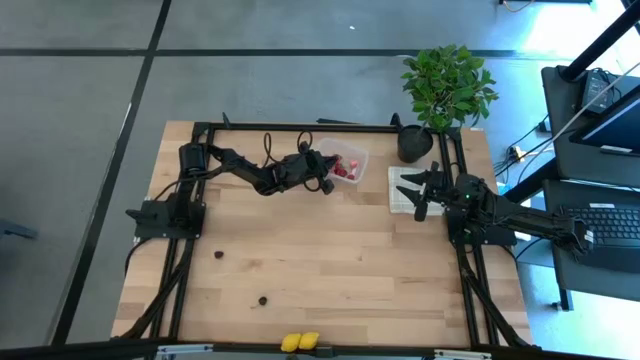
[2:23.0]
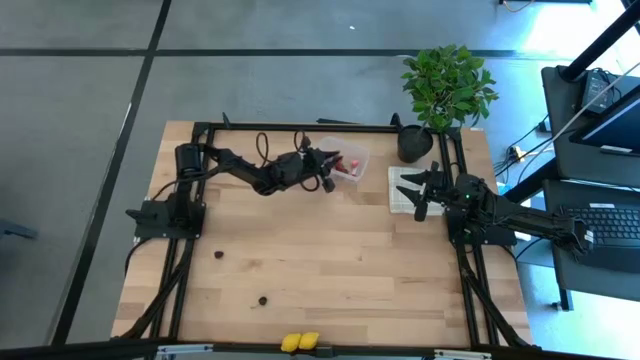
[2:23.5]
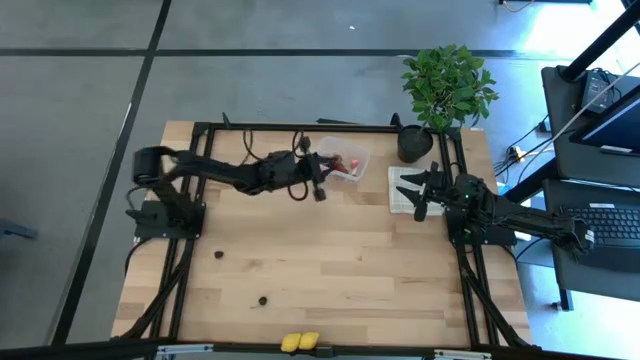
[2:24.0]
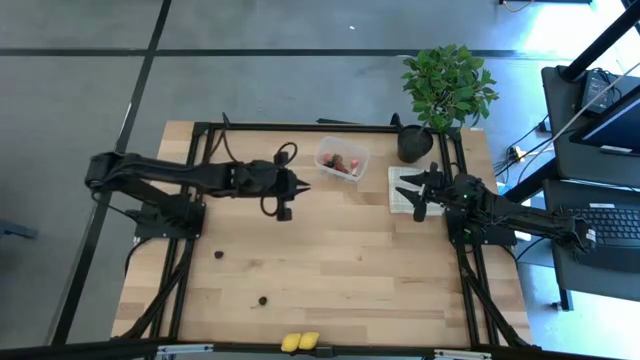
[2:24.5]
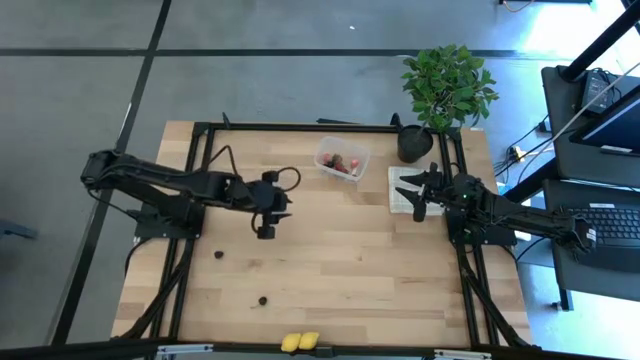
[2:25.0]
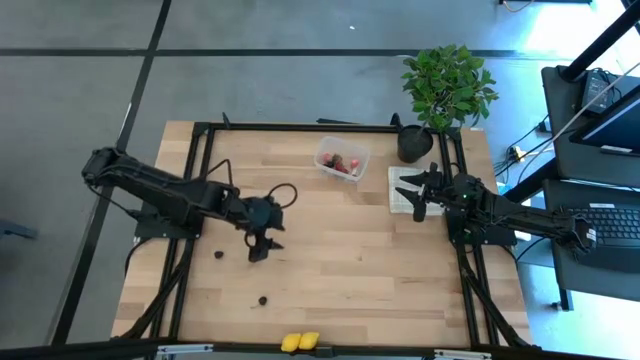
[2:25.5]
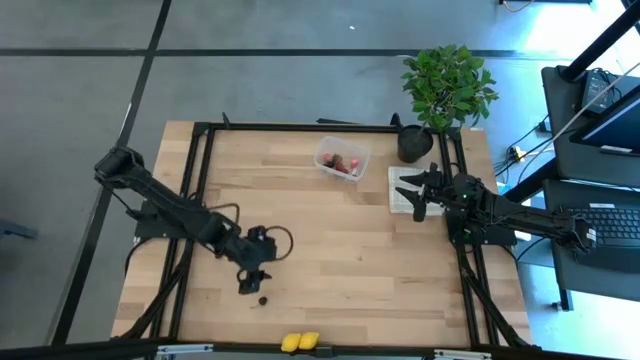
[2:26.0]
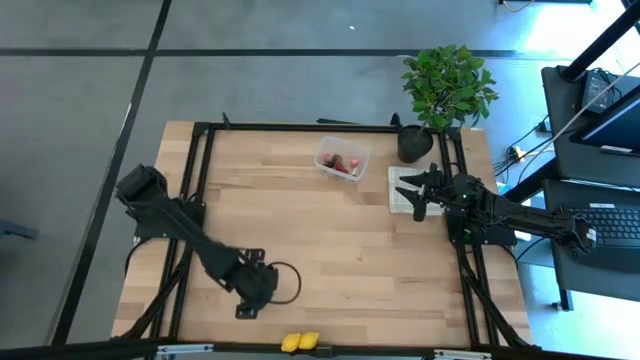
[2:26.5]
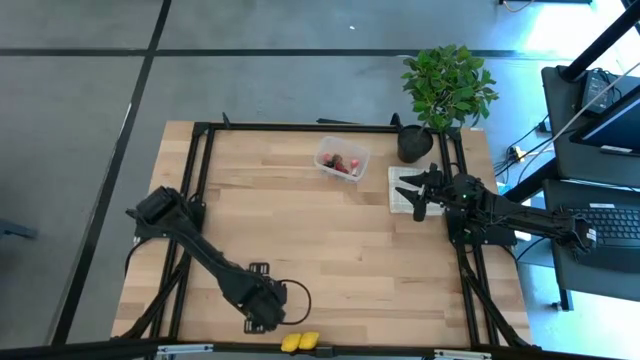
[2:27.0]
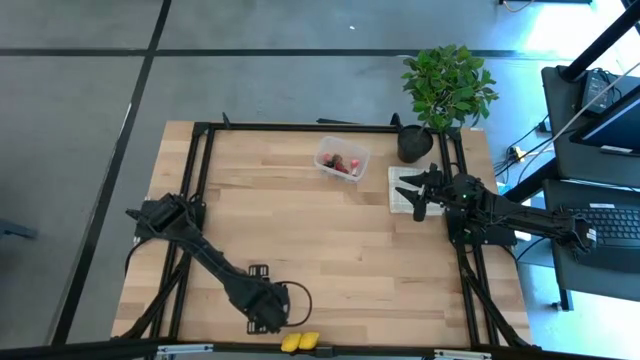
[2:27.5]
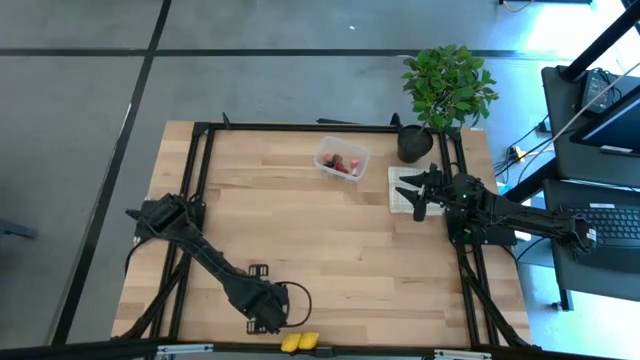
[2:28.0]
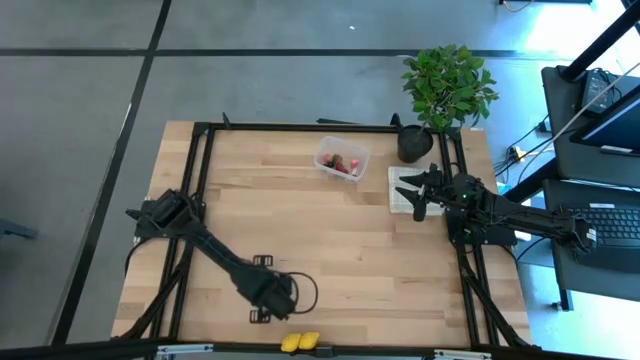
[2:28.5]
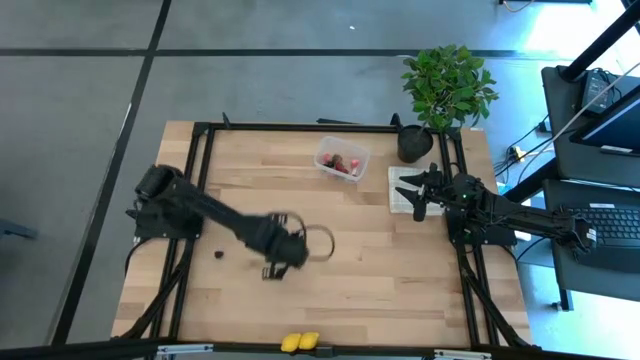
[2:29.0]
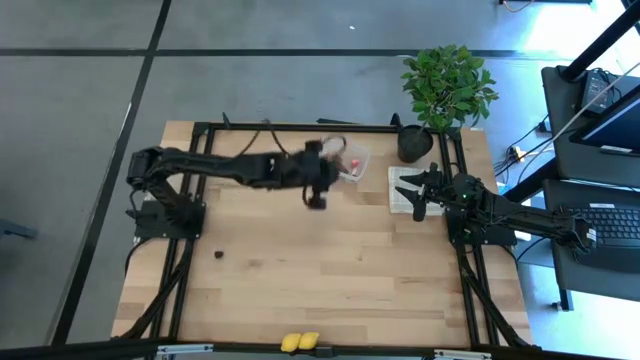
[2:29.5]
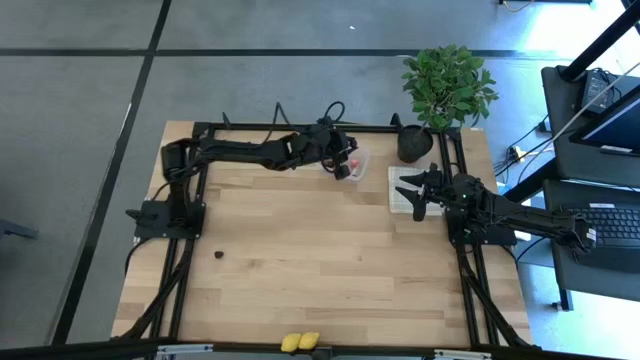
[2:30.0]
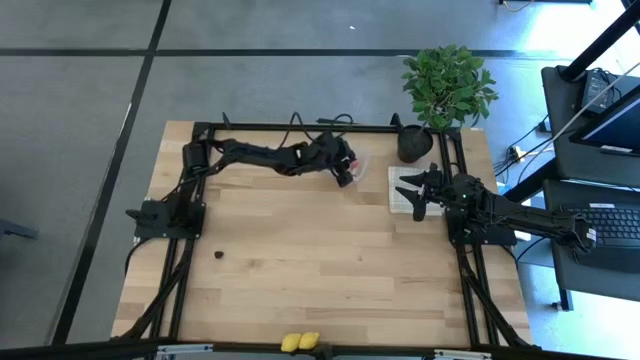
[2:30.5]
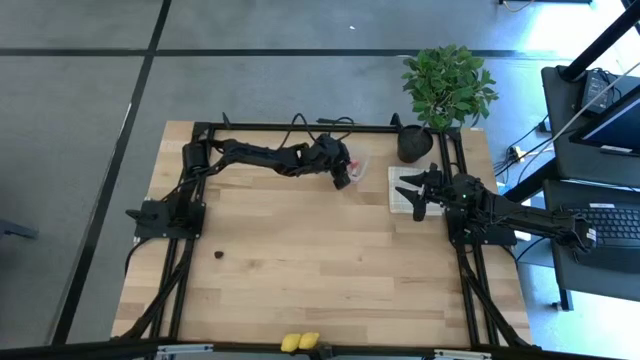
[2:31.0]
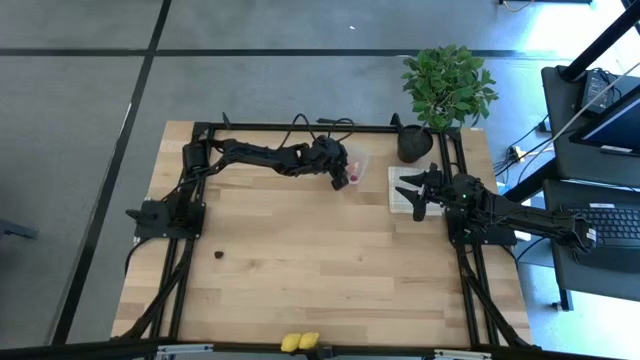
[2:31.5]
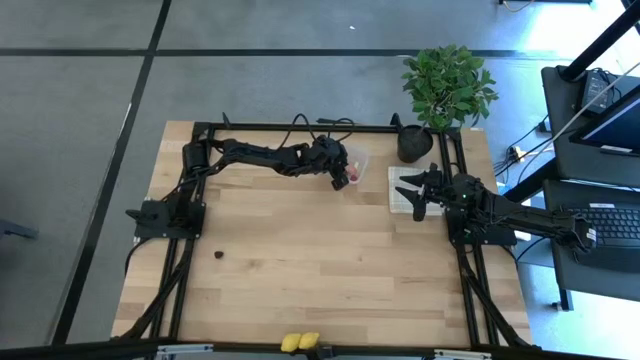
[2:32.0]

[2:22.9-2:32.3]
Task: Pick and placing Produce into tupperware
Put the black cherry into the transparent container

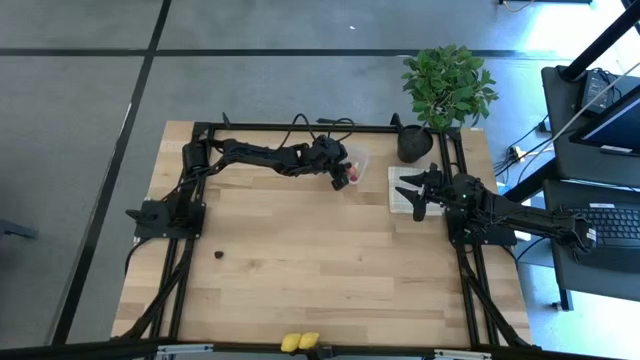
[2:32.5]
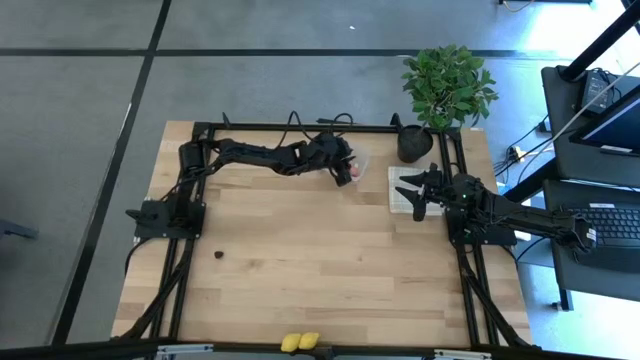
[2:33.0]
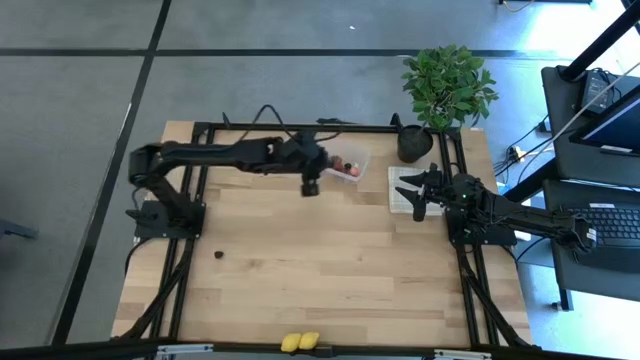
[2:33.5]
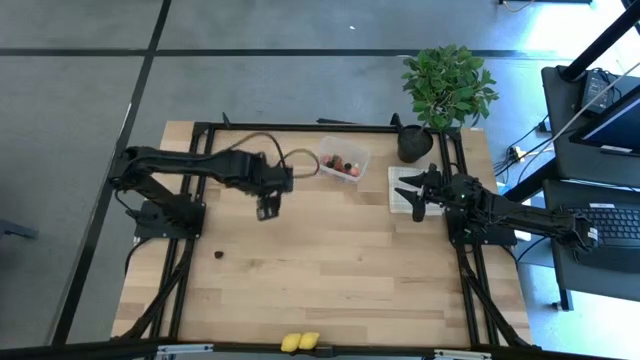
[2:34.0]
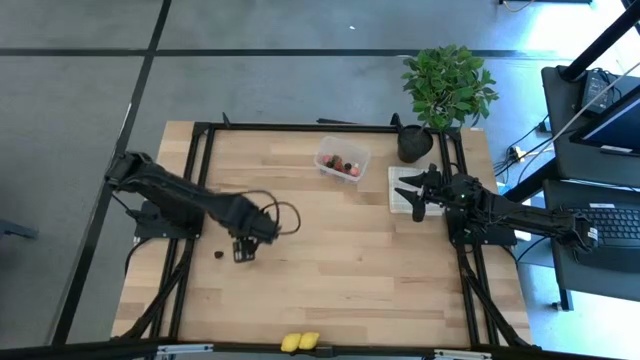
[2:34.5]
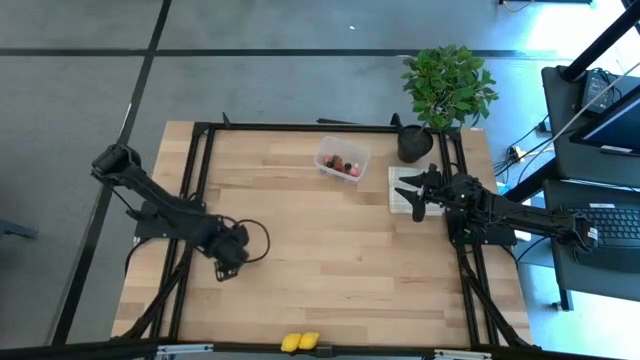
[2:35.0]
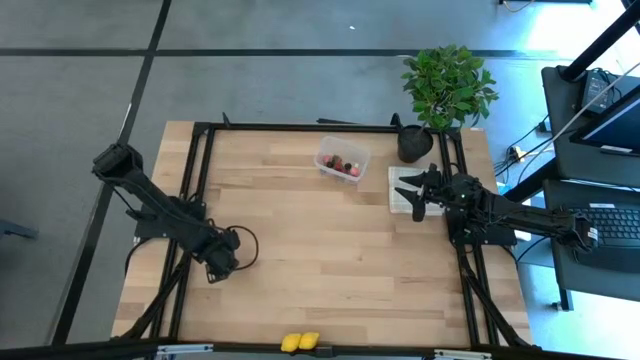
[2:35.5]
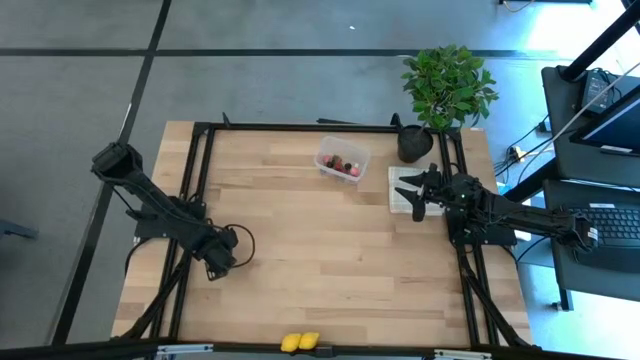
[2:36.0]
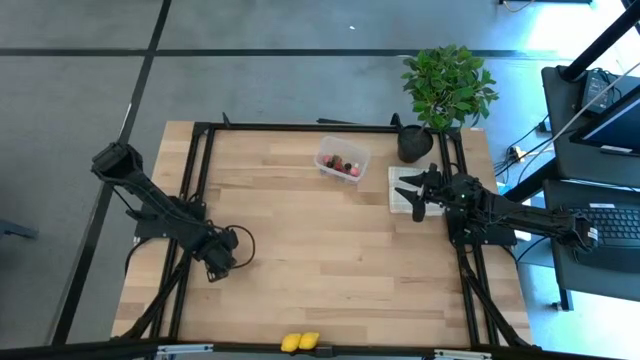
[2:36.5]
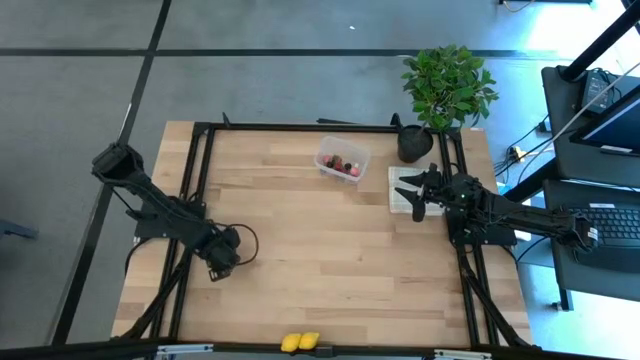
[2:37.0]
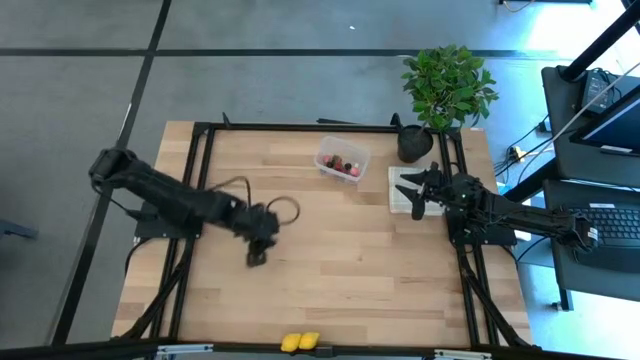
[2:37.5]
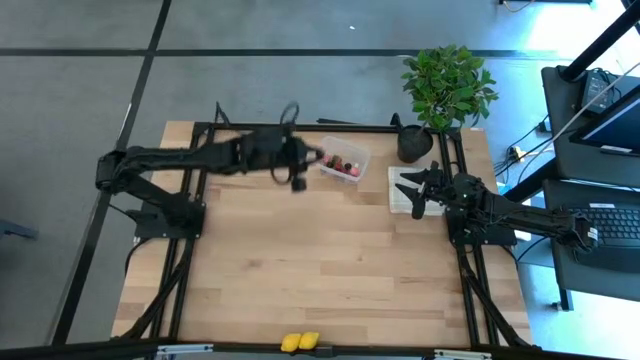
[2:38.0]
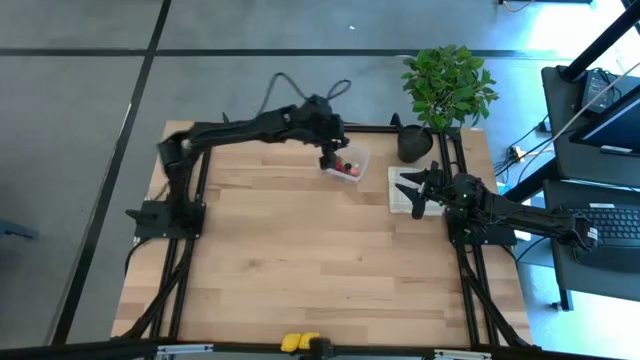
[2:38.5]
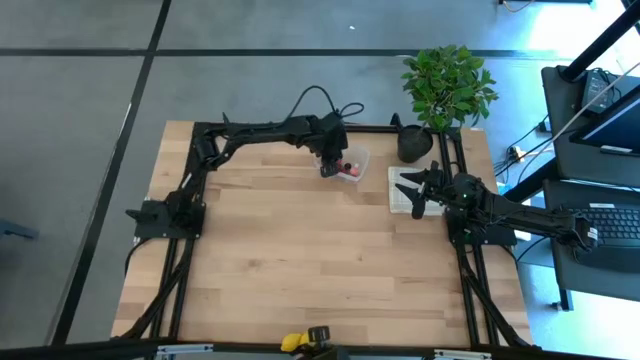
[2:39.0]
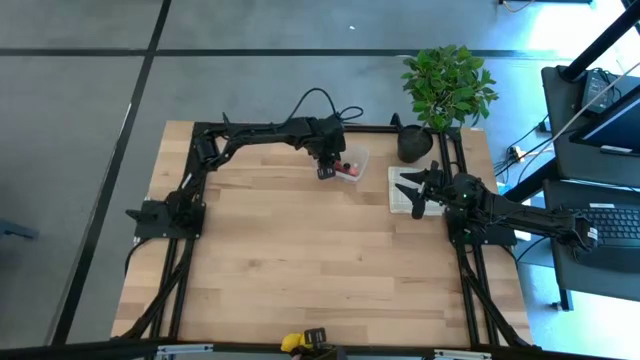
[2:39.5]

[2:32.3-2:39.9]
Put the blackberry into the transparent container

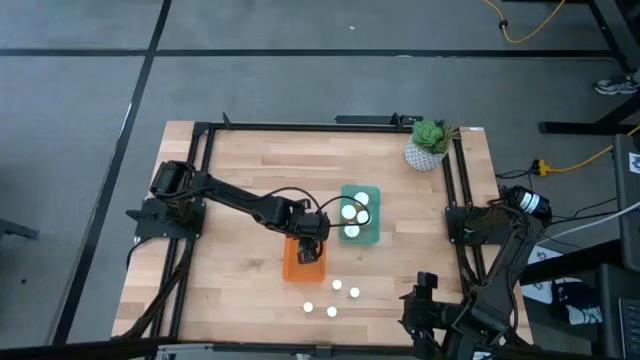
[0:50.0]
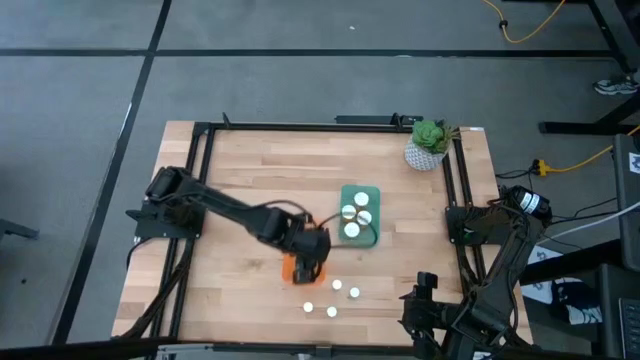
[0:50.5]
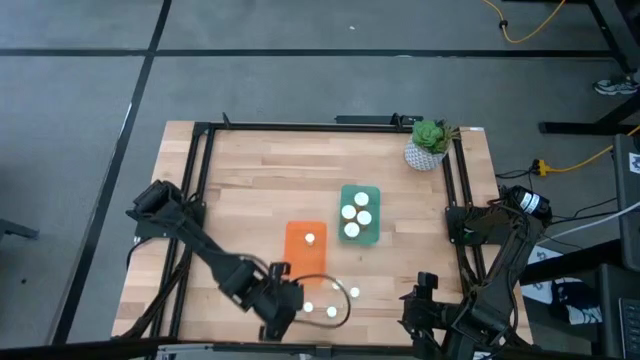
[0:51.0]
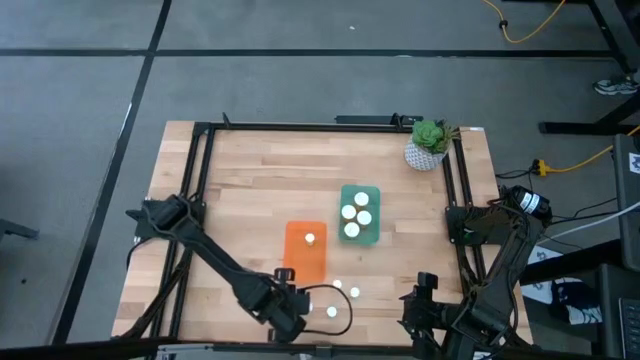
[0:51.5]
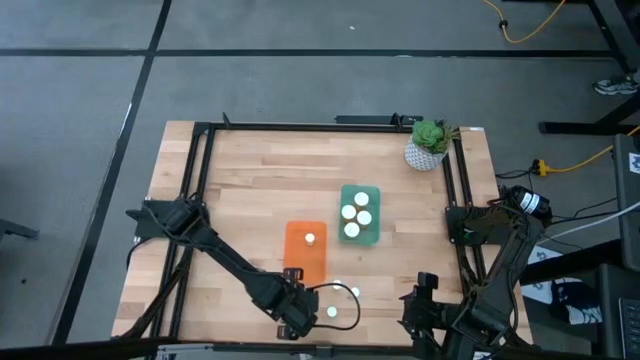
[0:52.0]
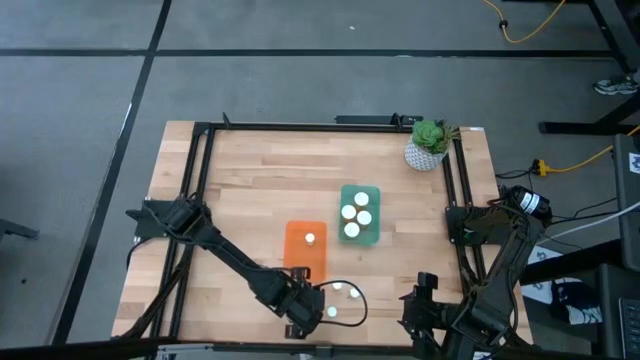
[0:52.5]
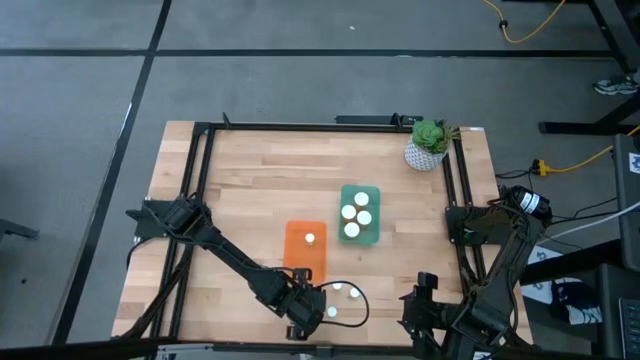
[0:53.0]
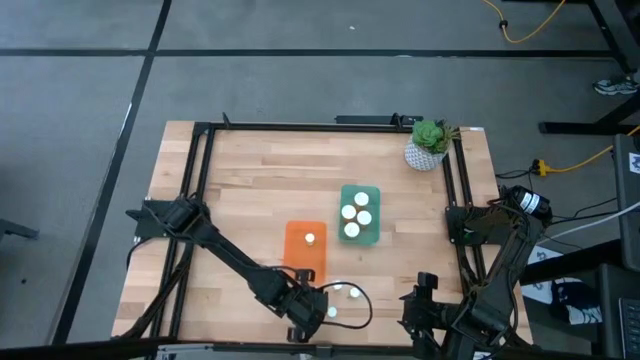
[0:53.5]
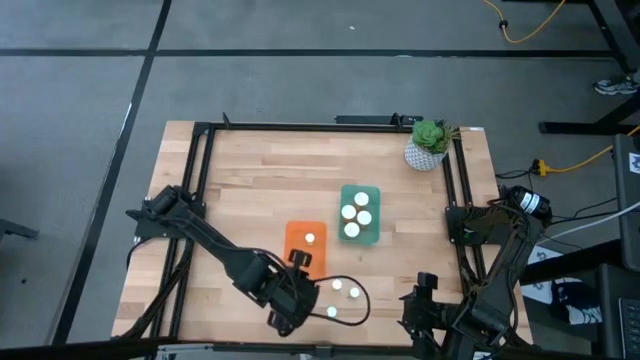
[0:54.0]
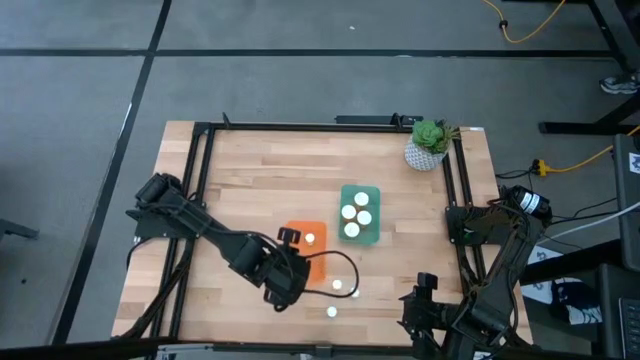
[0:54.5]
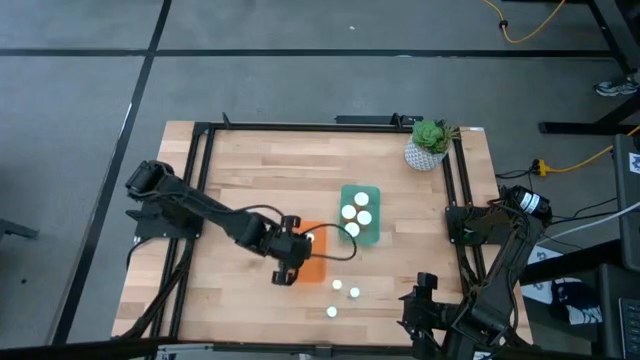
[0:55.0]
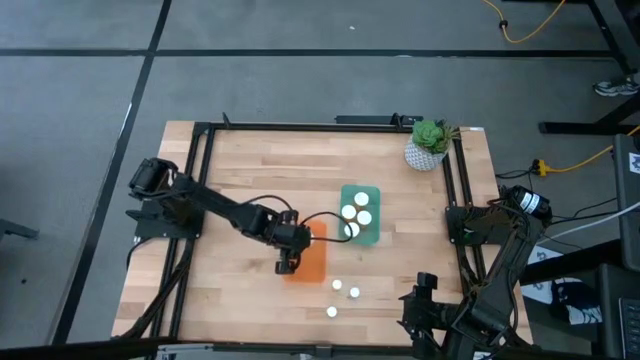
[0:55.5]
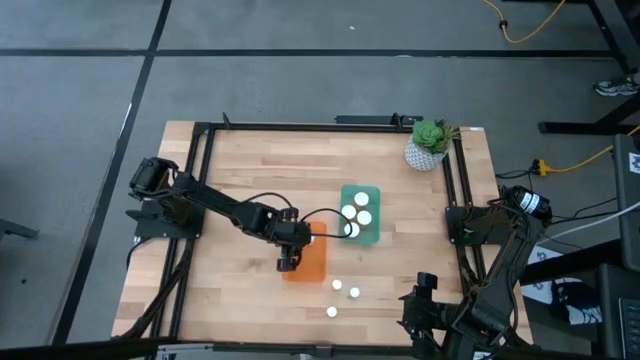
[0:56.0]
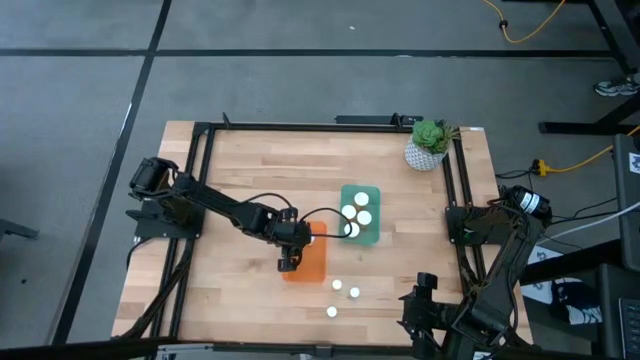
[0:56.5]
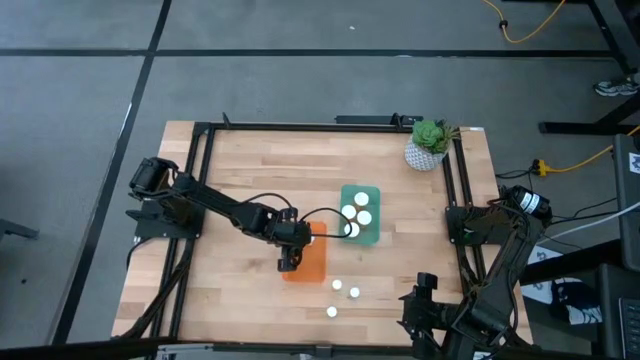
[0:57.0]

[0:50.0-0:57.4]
Task: Pick and place medicine bottles into bin by pill shape (circle, oval)
Put the small pink tablet bottle into the orange bin
